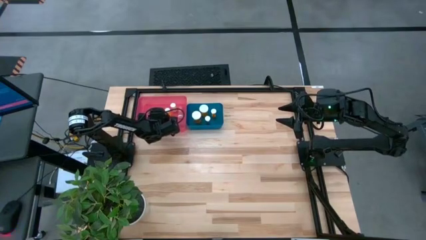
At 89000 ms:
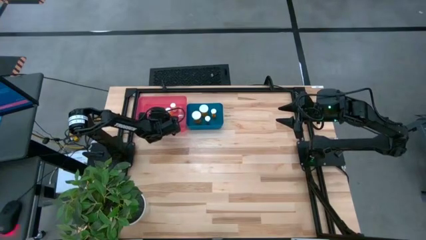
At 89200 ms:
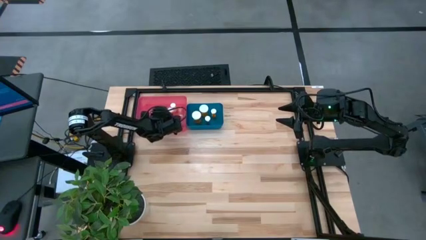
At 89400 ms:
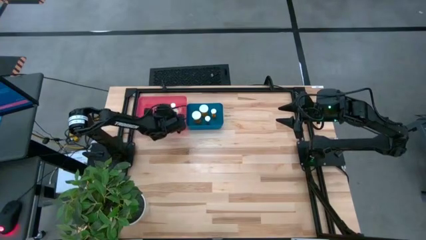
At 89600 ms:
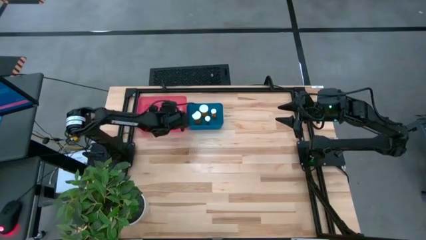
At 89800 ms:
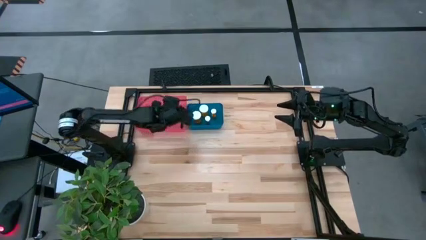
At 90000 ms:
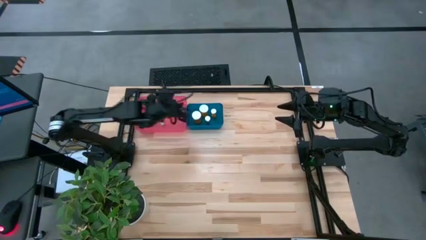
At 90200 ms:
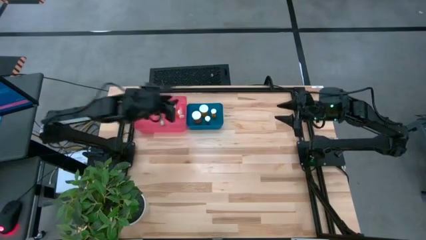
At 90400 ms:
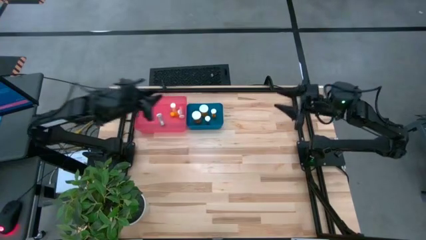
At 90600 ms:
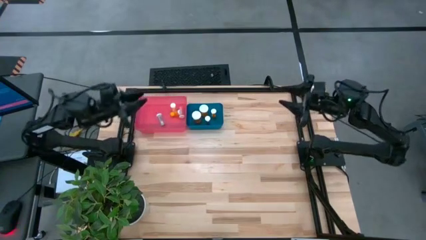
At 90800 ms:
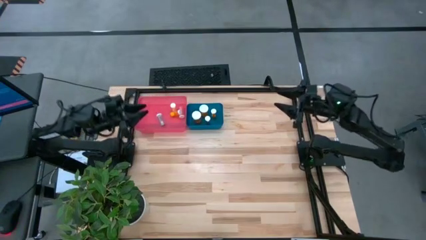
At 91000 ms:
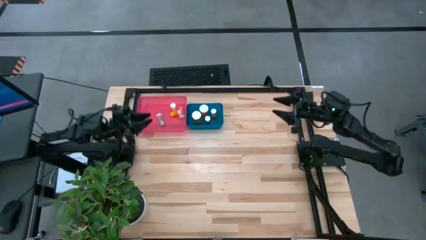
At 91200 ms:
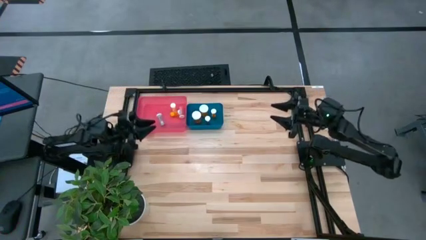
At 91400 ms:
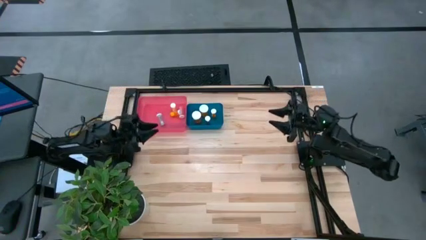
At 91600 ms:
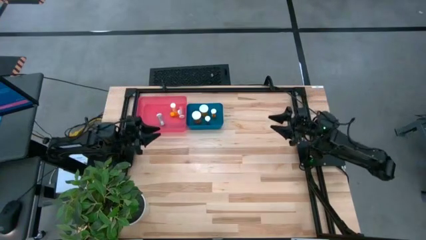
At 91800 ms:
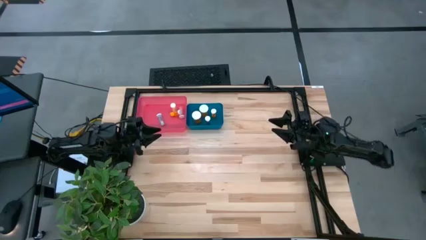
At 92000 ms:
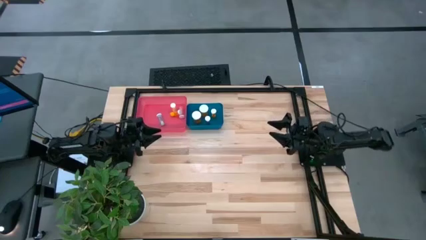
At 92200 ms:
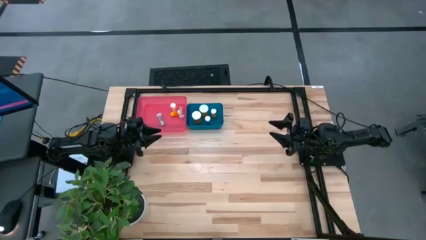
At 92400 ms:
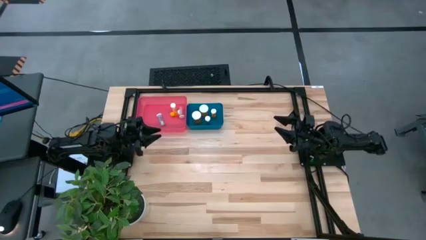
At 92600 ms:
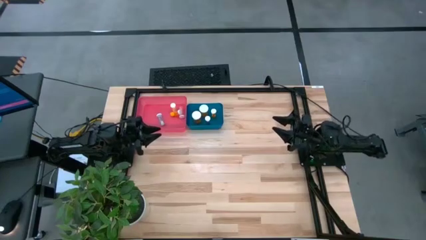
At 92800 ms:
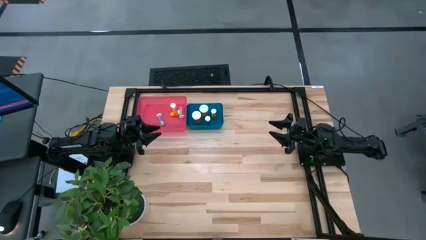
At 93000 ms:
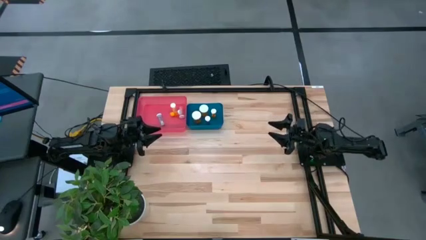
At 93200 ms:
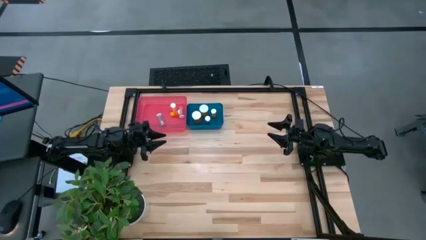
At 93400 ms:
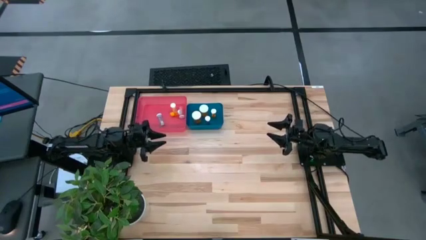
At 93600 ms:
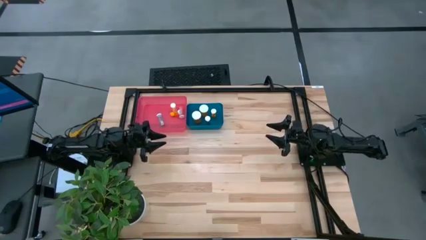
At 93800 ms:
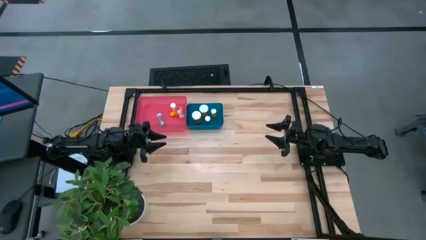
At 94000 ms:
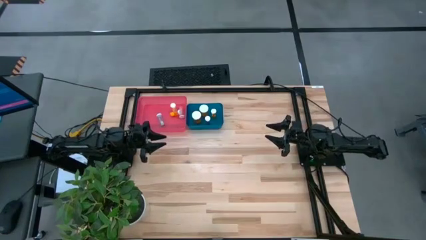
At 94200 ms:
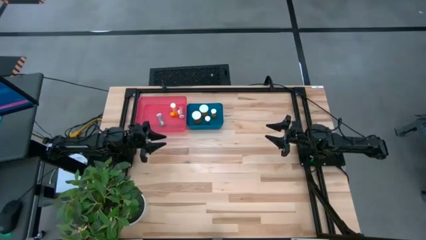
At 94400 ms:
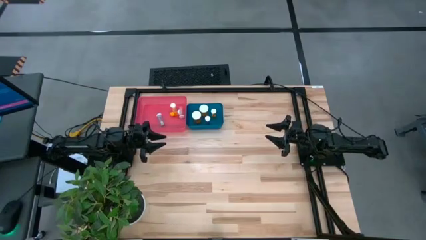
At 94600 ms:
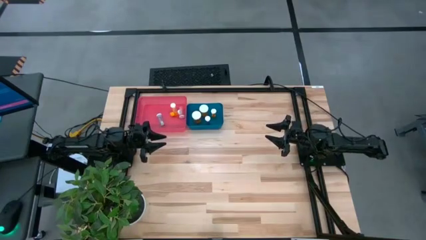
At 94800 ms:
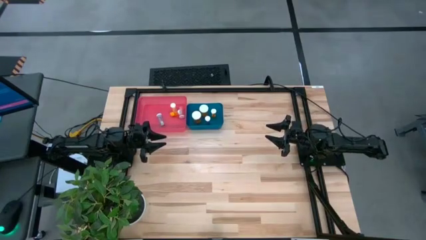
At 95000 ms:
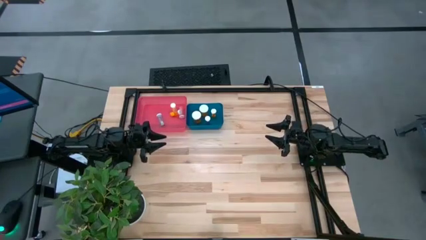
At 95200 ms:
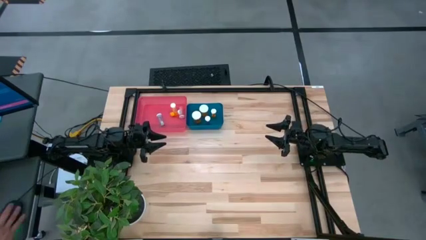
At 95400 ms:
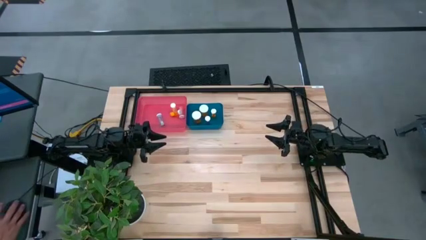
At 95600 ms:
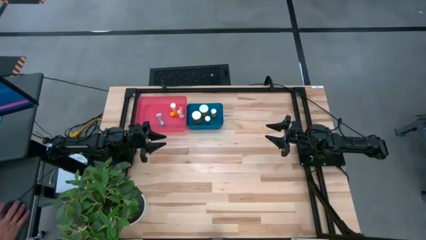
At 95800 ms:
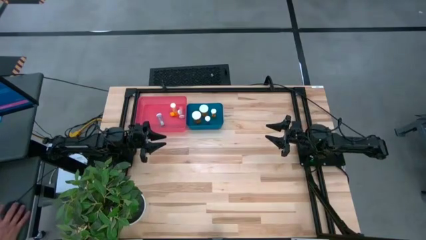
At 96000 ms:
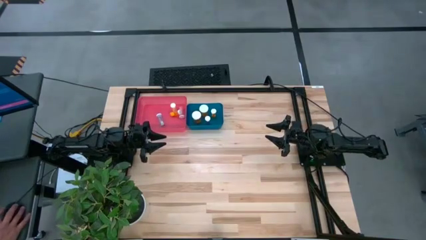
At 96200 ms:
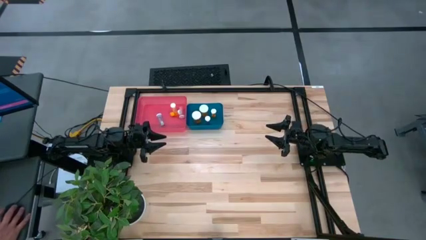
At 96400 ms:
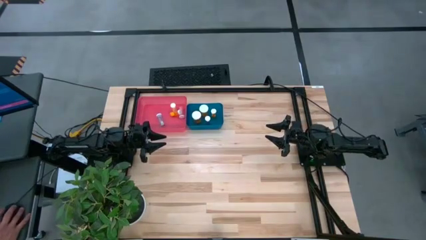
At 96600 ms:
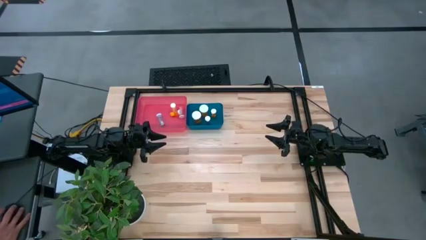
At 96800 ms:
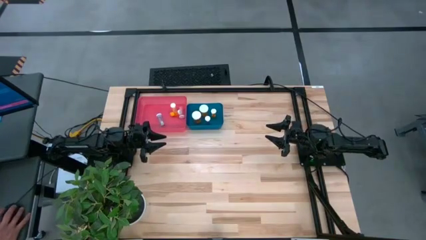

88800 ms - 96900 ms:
Task: Pick and place medicine bottles into bin by pill shape (circle, oval)
Return to Home Position

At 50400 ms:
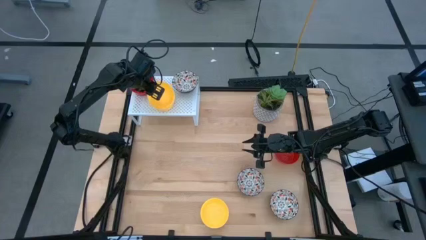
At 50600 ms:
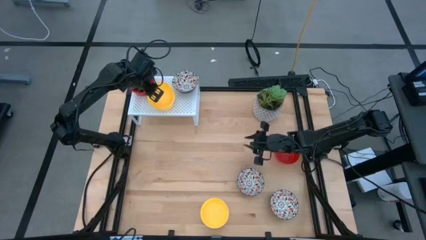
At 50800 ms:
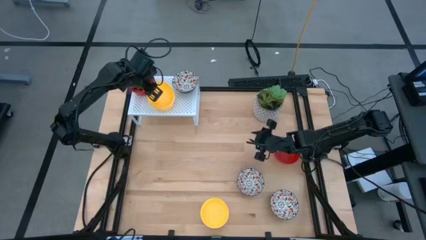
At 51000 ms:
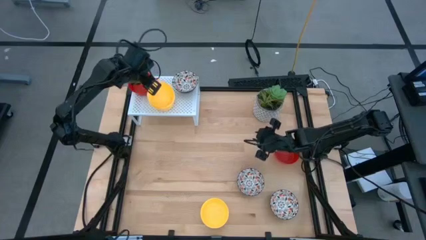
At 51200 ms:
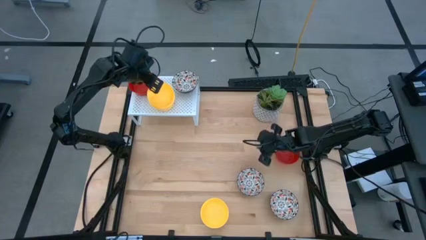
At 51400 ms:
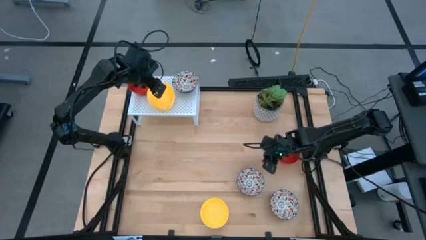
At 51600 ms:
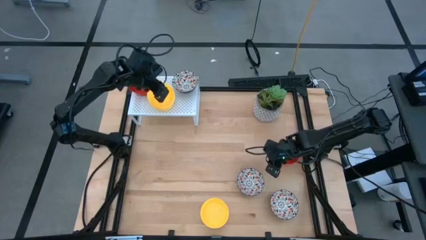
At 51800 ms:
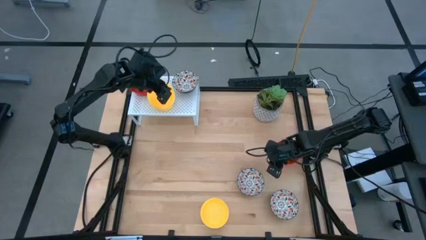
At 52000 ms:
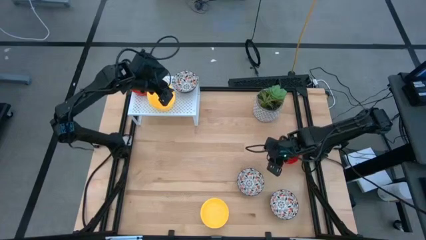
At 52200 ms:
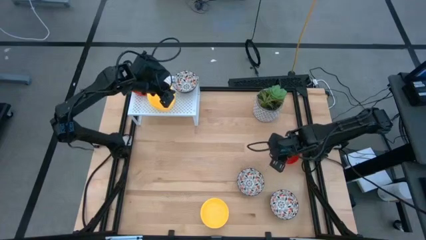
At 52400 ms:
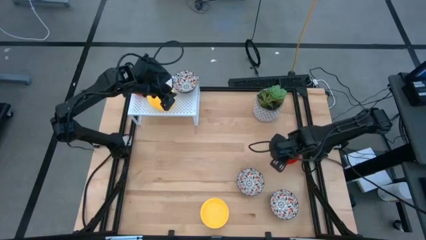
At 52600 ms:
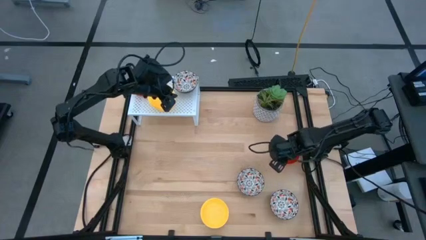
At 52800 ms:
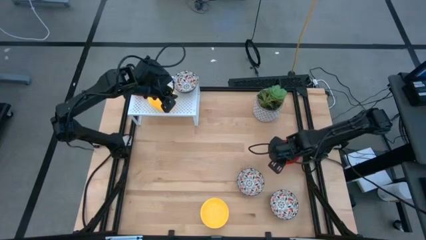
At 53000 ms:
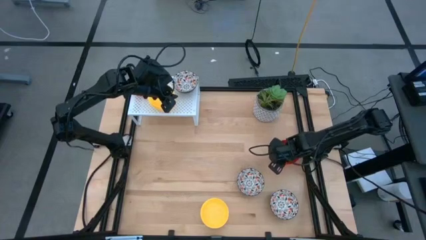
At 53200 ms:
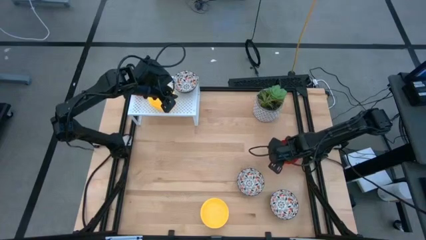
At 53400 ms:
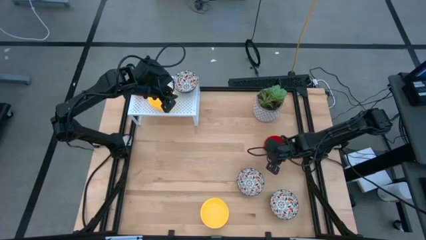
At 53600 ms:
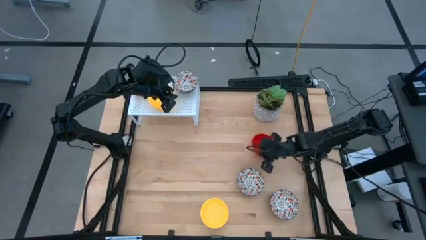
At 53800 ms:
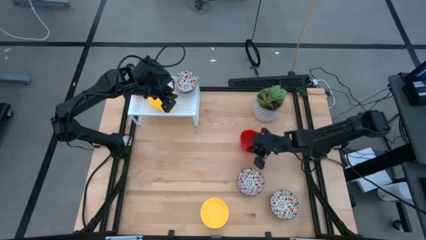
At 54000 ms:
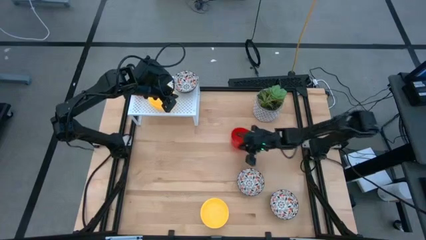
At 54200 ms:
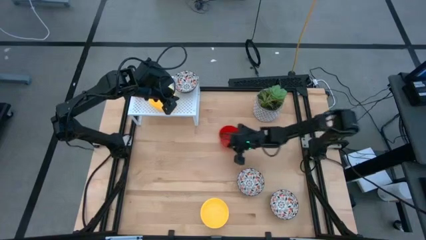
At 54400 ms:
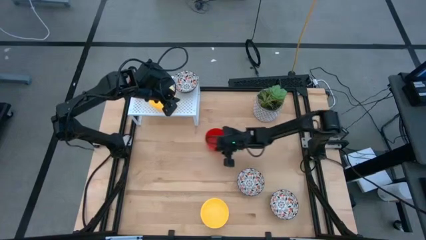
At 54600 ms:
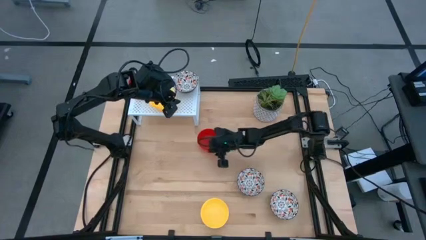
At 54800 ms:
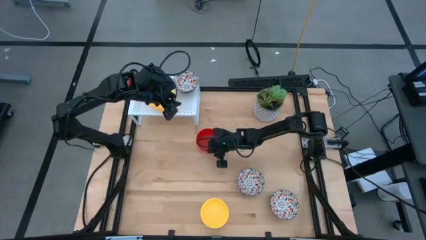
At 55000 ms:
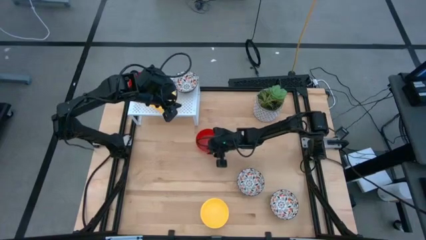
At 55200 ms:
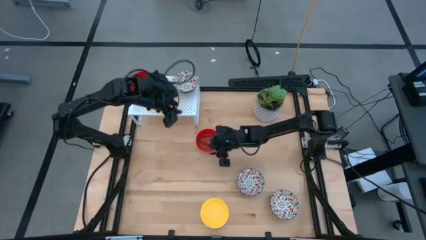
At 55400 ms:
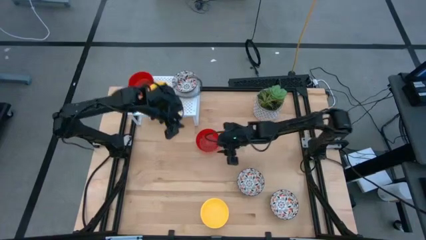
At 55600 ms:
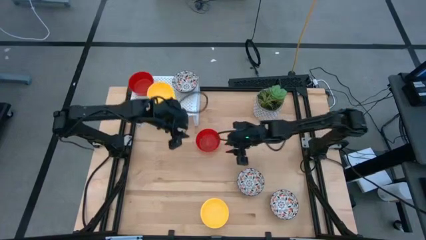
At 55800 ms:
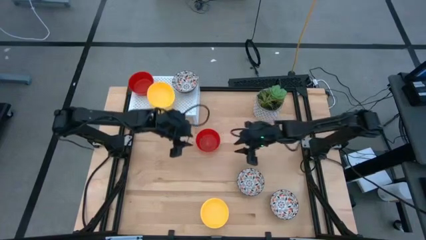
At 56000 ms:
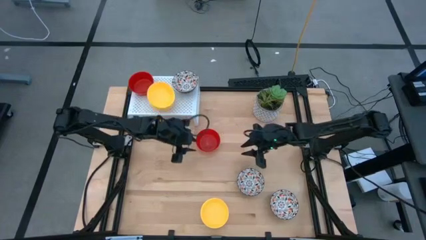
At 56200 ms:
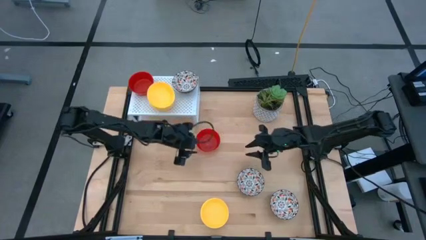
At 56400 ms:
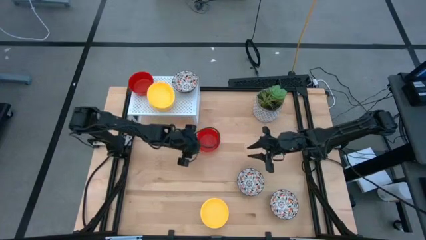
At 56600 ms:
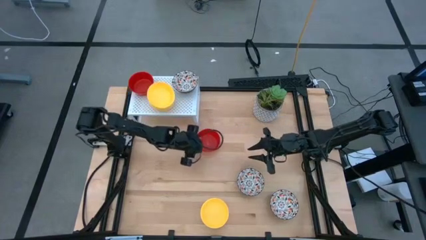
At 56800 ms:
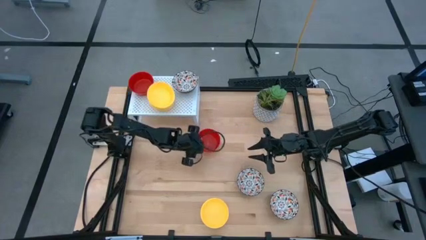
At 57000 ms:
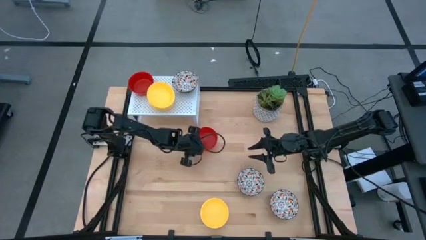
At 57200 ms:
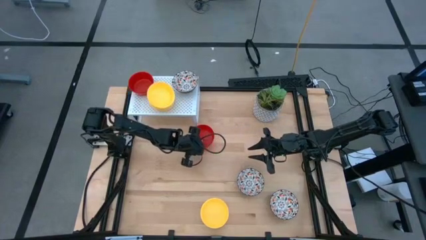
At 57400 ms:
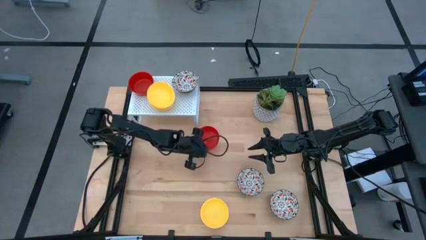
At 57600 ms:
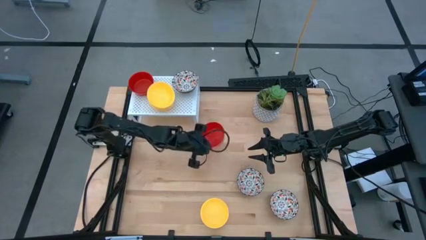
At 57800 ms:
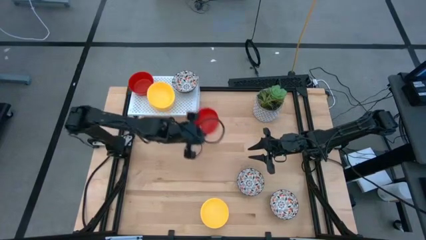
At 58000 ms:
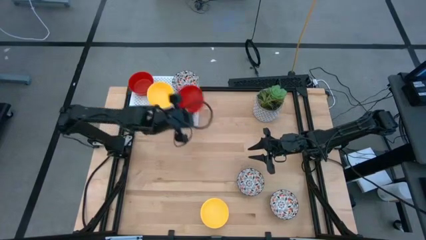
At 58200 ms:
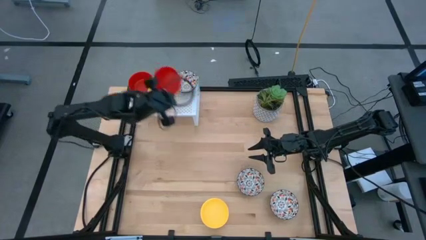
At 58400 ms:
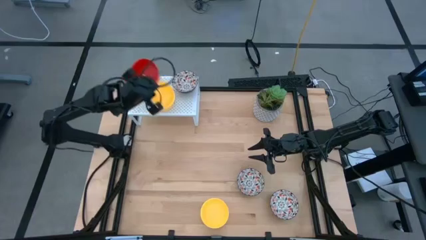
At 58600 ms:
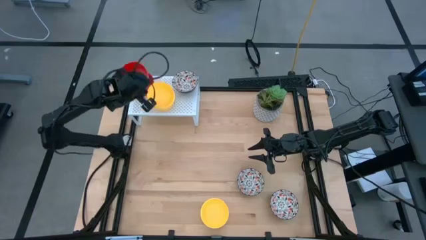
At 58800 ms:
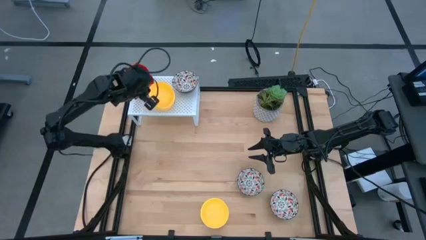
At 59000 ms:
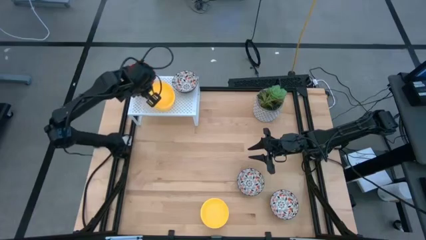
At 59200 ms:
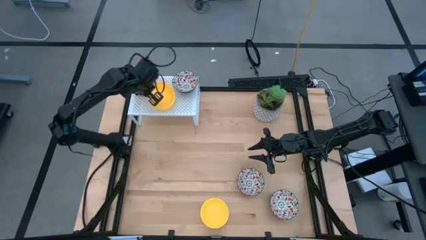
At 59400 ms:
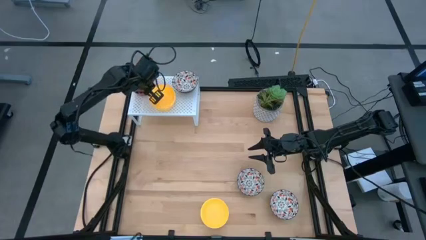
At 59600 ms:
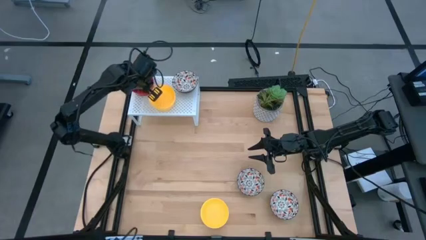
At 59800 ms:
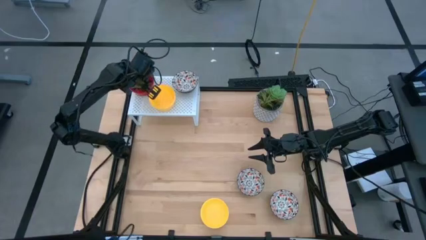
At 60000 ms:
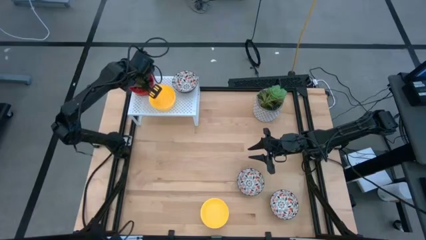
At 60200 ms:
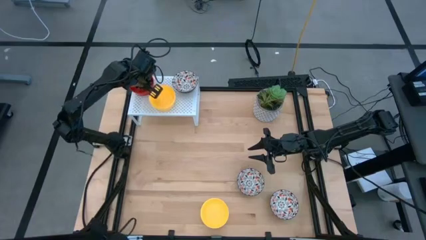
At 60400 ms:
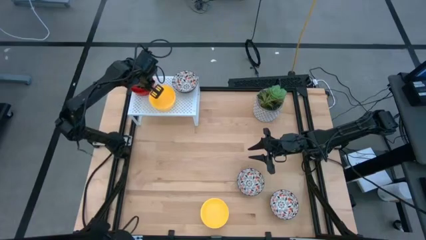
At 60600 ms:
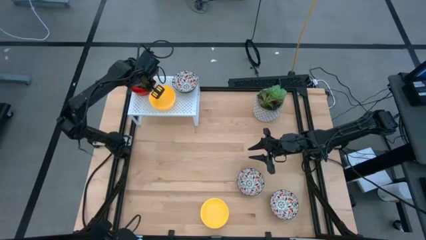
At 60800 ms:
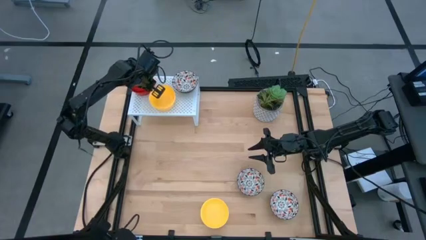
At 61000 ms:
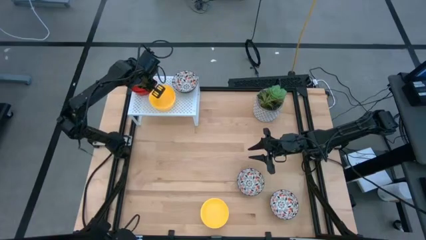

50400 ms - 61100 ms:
Task: Pick & Place Mini bowls
Stack the red bowl on the red bowl on the shelf
